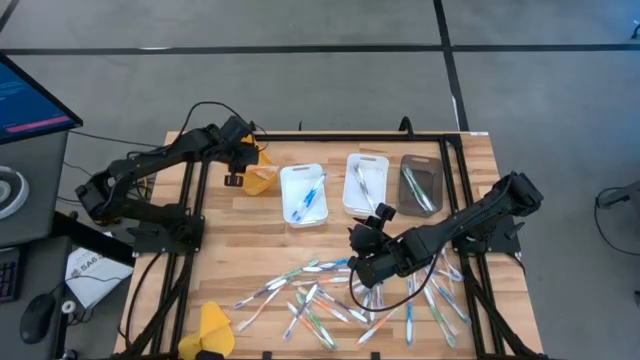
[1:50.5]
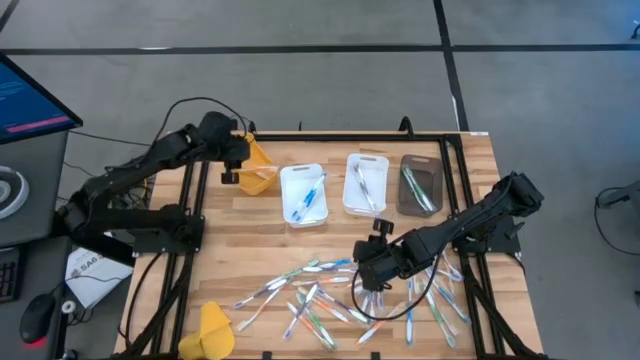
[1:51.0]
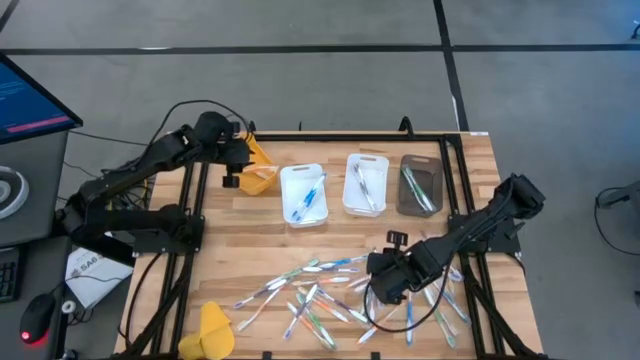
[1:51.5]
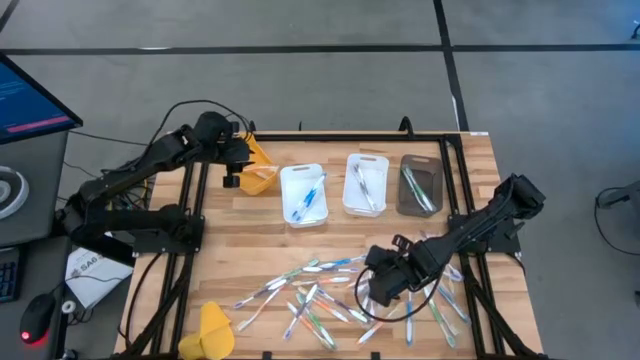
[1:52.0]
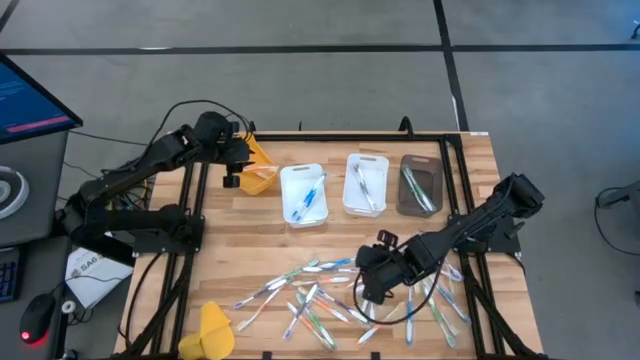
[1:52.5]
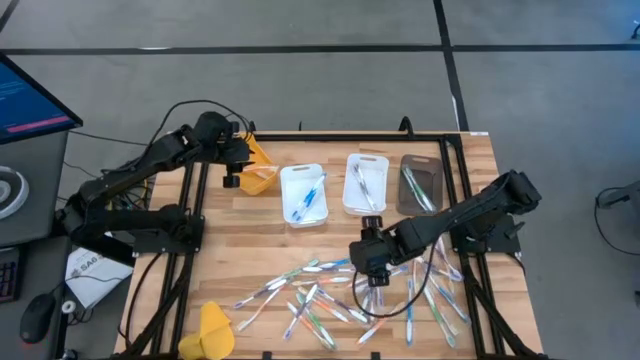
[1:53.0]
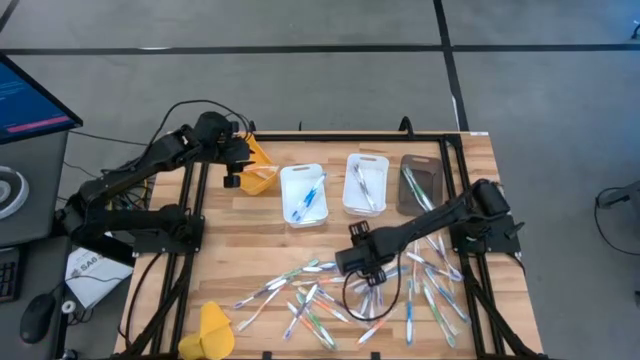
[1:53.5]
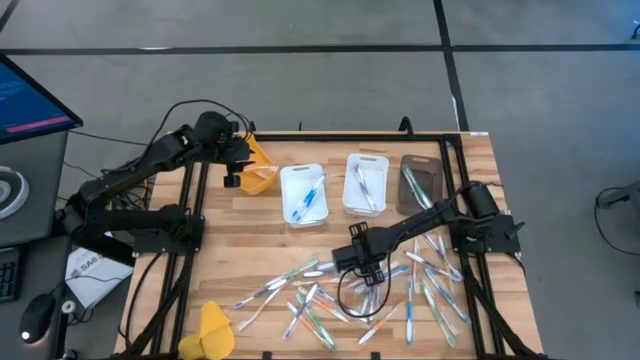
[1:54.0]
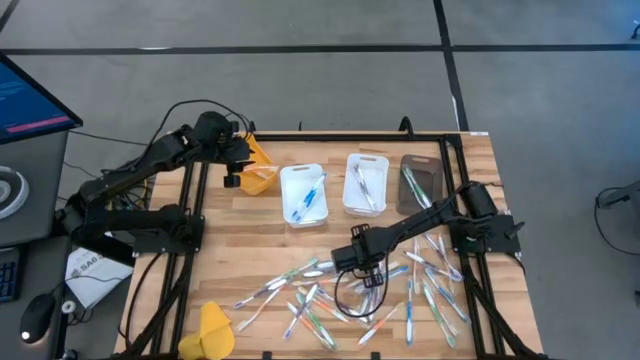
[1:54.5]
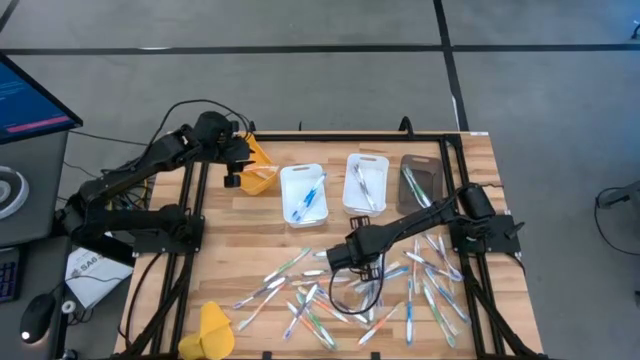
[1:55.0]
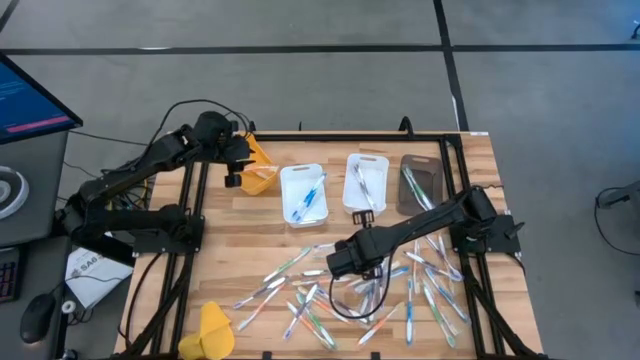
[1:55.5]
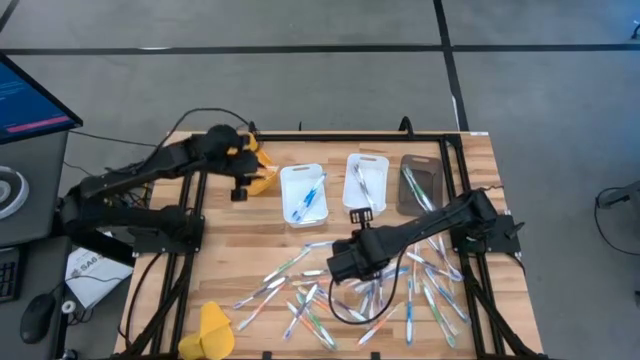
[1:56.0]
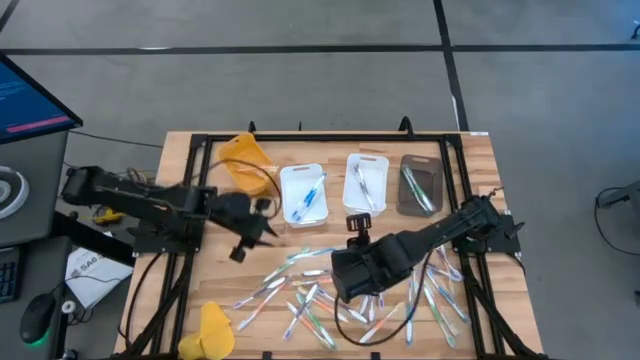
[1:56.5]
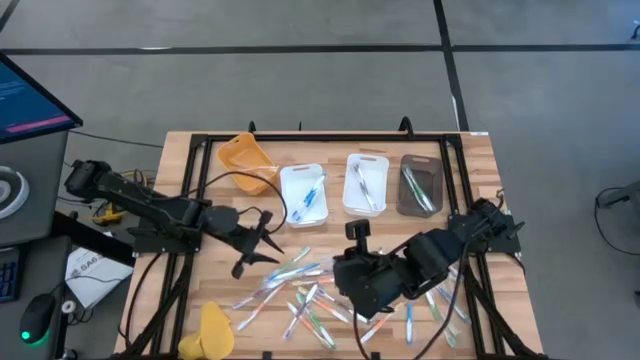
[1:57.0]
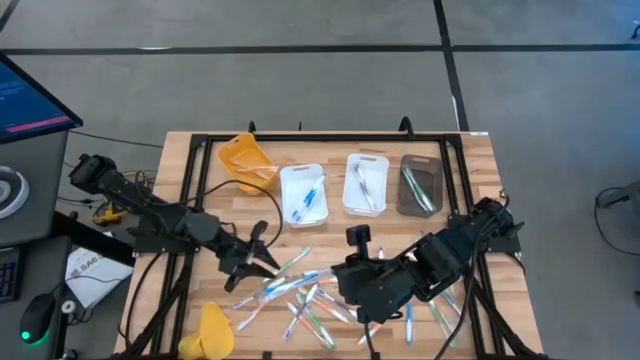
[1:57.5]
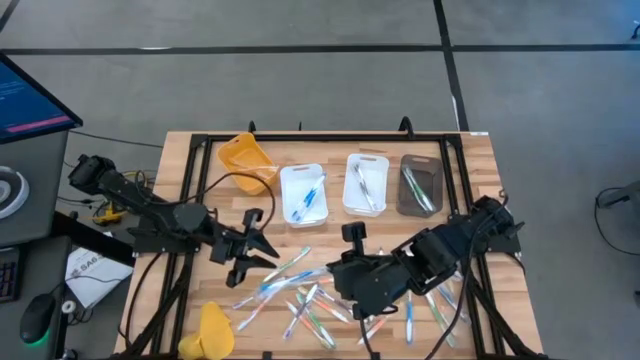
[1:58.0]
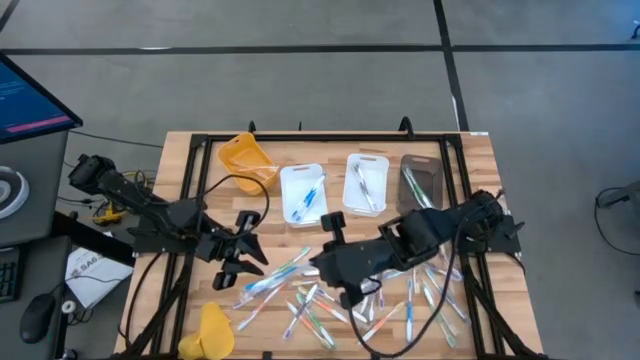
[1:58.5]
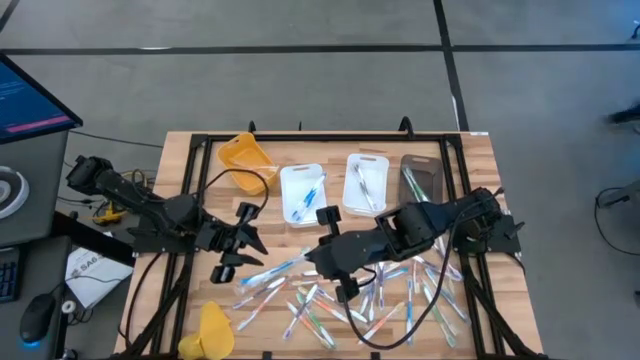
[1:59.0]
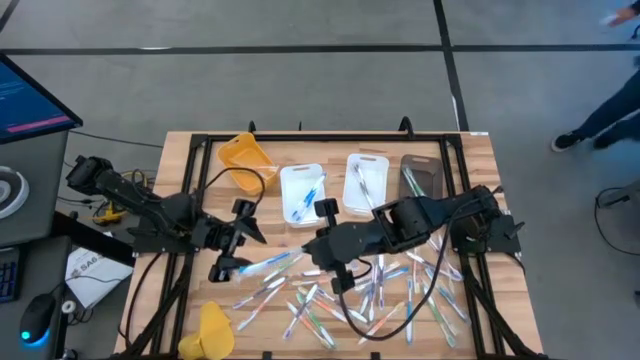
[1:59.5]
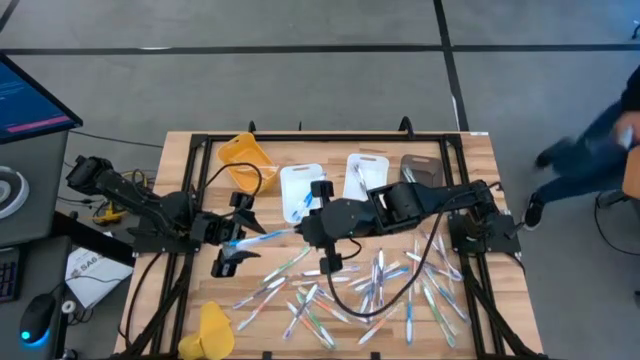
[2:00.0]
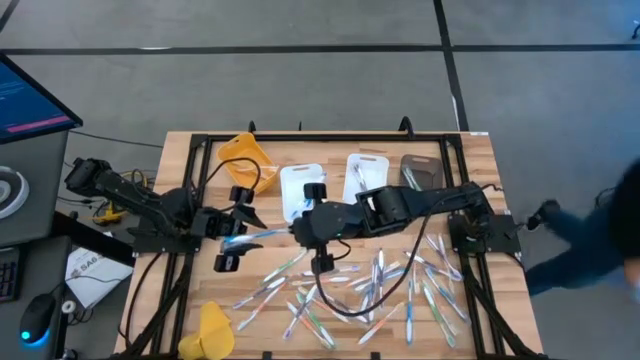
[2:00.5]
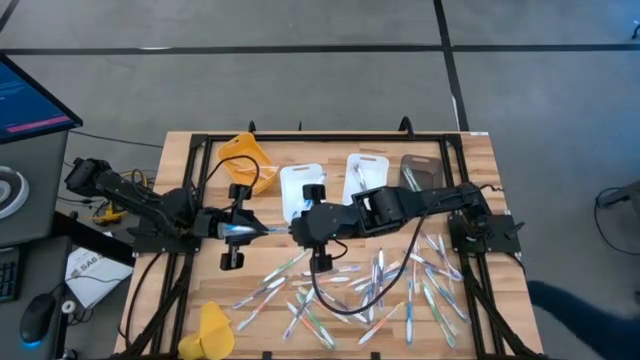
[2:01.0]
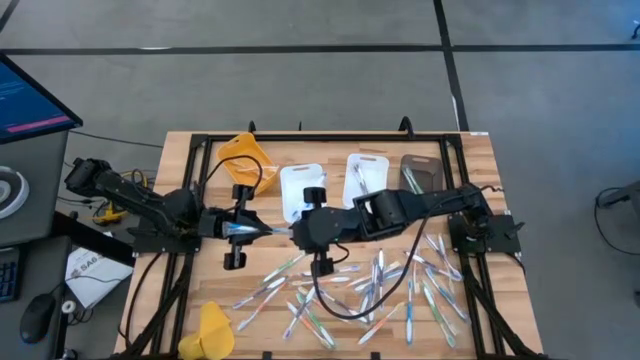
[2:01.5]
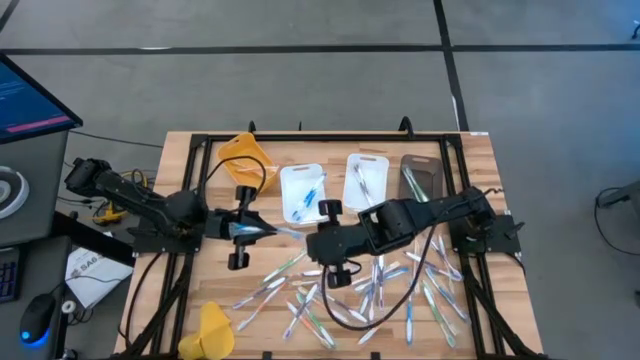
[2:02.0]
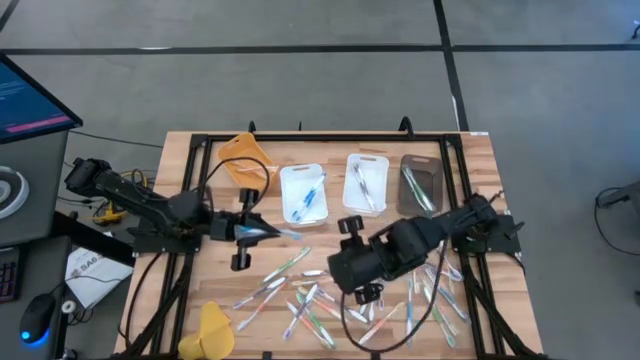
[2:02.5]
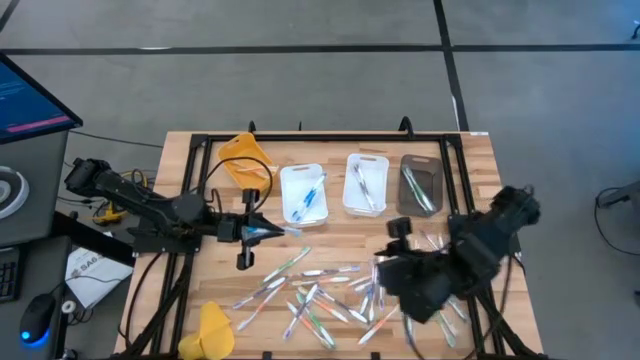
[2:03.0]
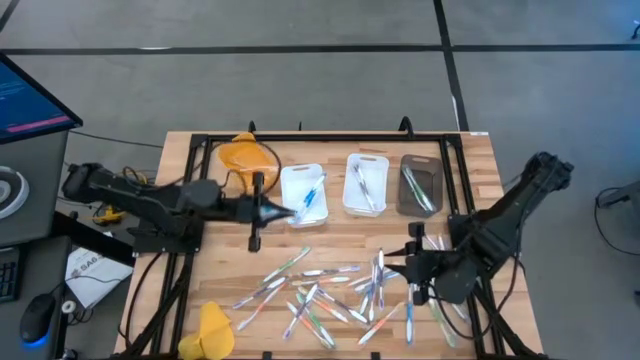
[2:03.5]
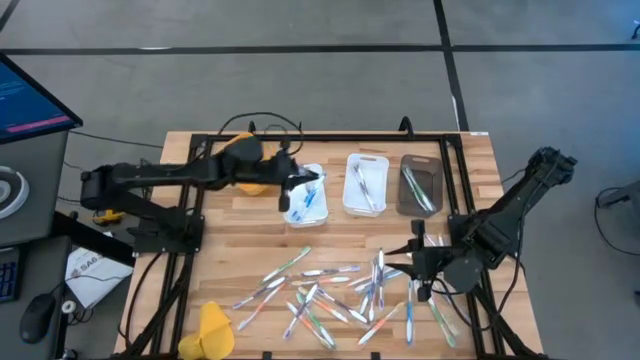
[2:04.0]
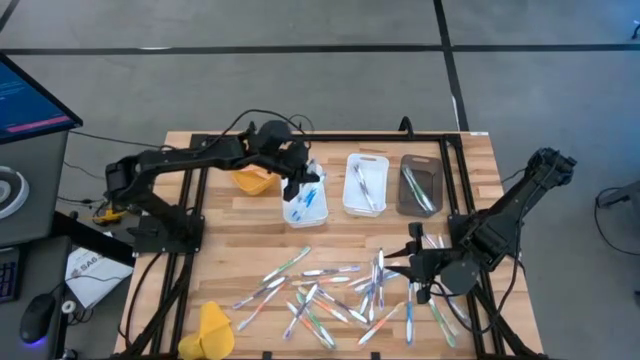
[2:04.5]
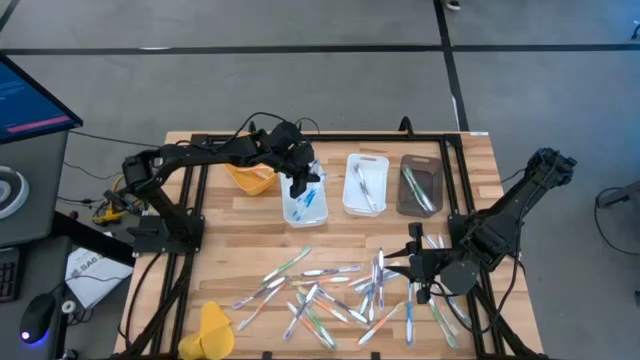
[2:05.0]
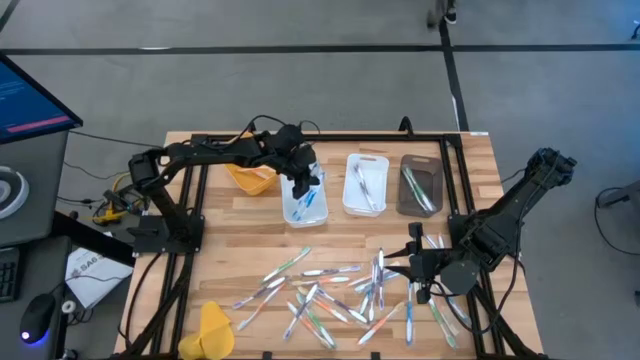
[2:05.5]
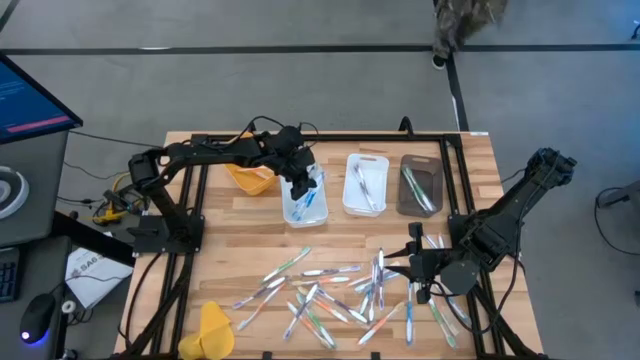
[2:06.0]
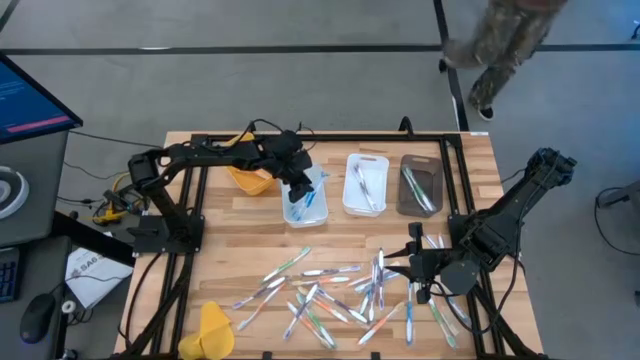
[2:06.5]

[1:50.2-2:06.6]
Task: Pick & Place Toothbrushes
Put the blue toothbrush into the left white bin

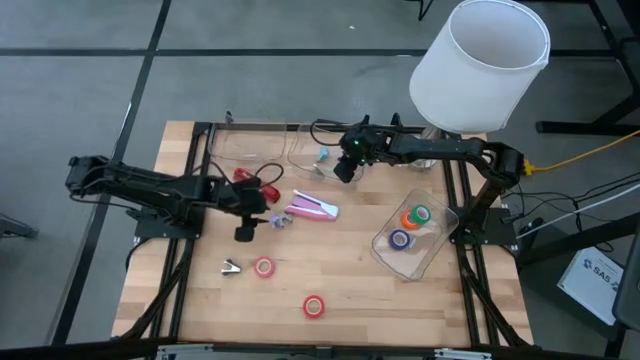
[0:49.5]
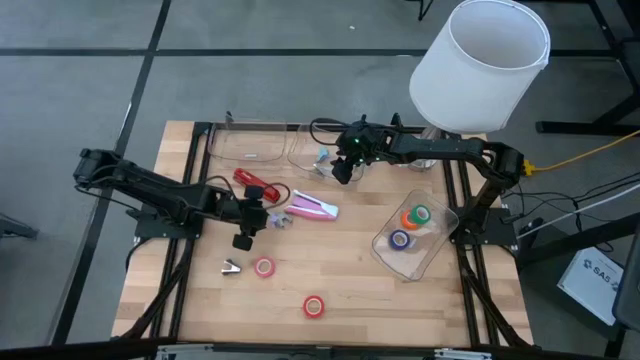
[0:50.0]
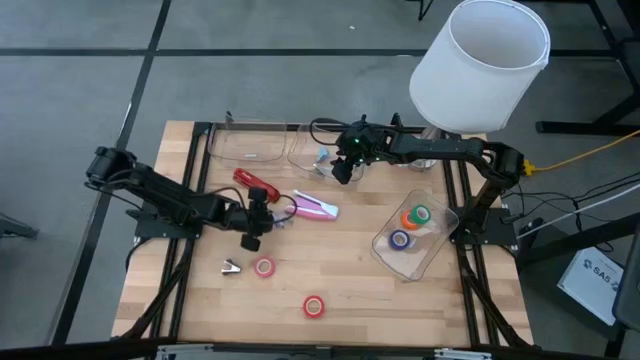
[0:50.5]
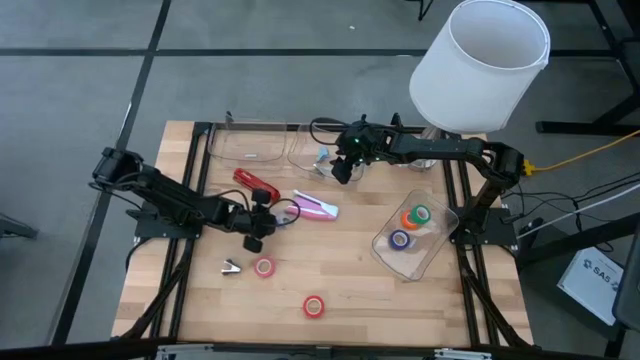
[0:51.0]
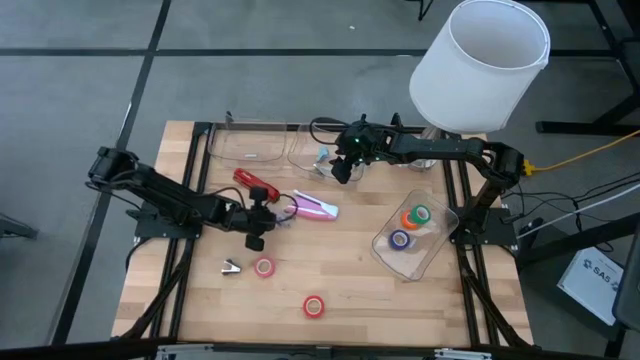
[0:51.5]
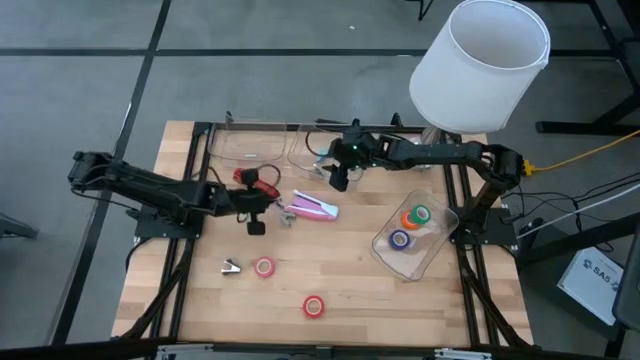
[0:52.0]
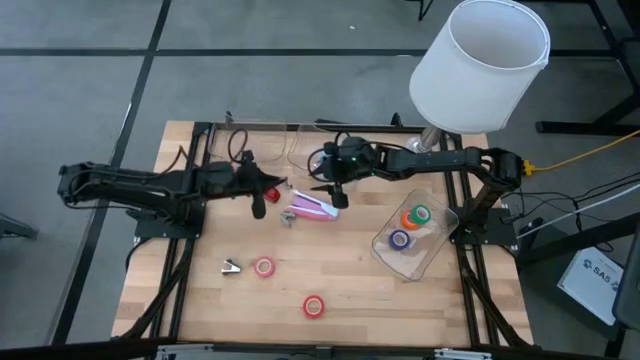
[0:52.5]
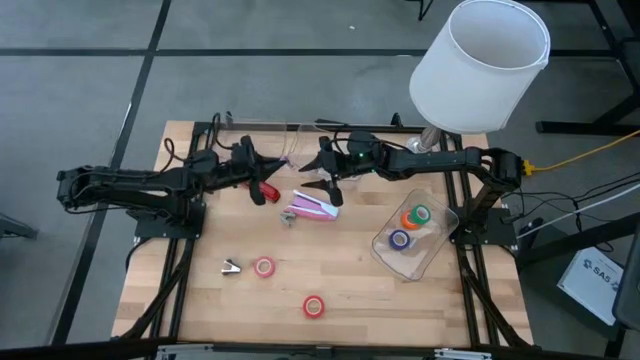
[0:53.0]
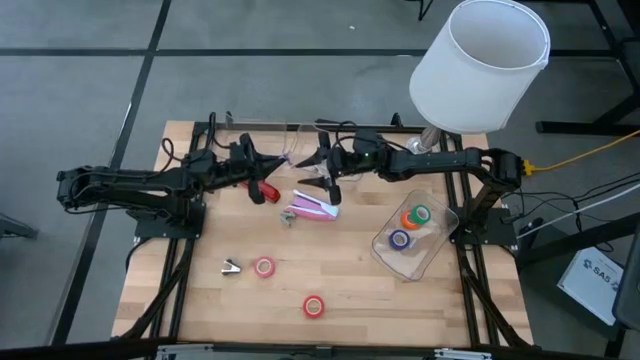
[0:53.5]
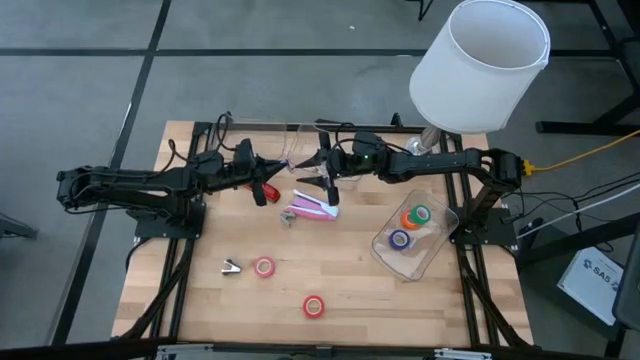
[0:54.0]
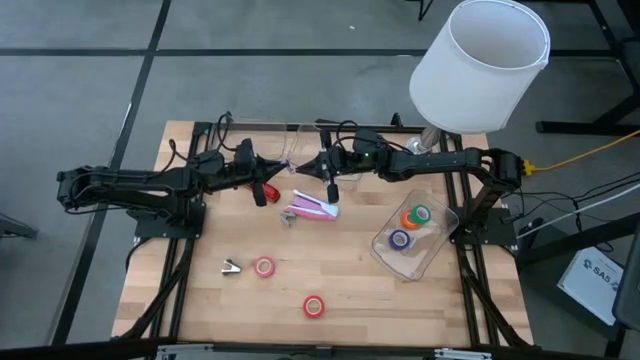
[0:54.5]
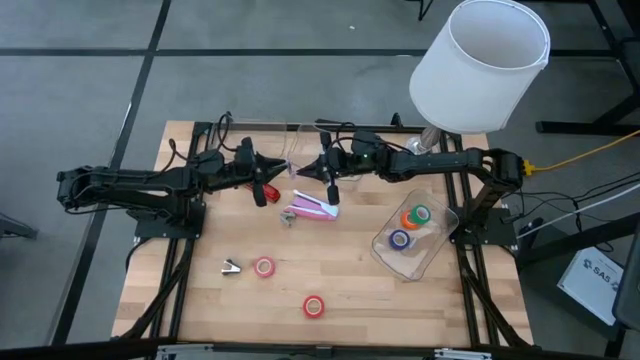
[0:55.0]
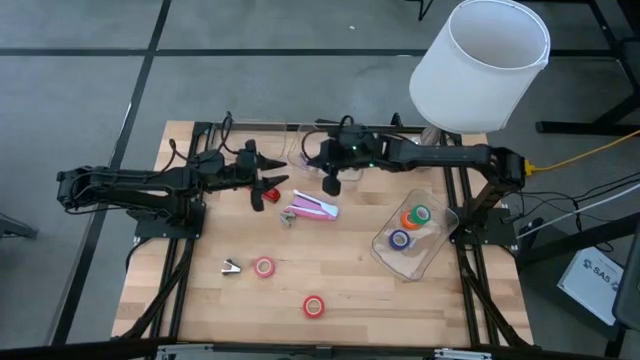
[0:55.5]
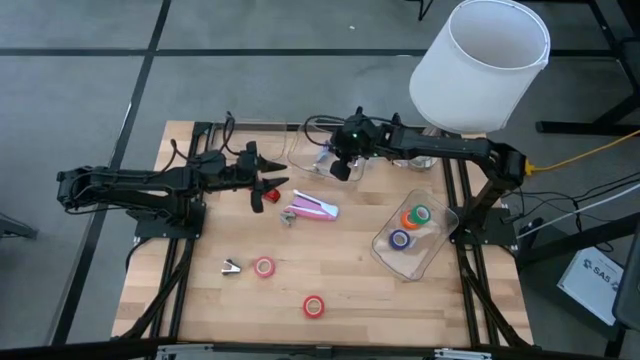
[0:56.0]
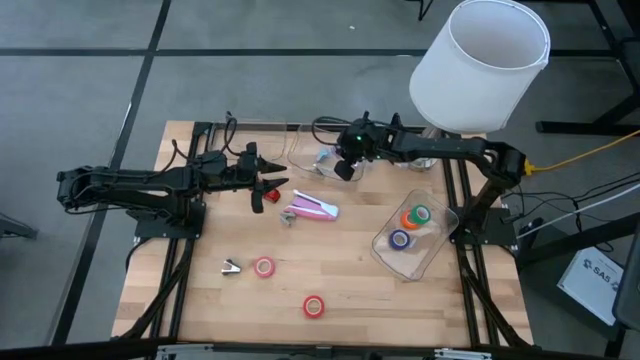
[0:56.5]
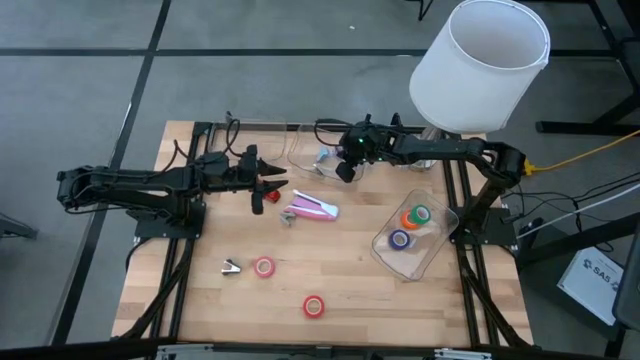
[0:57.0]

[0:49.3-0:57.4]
Task: Pick and place Stapler, Stapler remover, tape
Put the purple staple remover into the top right transparent bin
